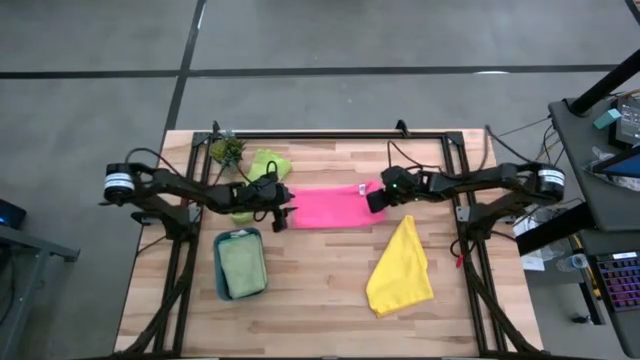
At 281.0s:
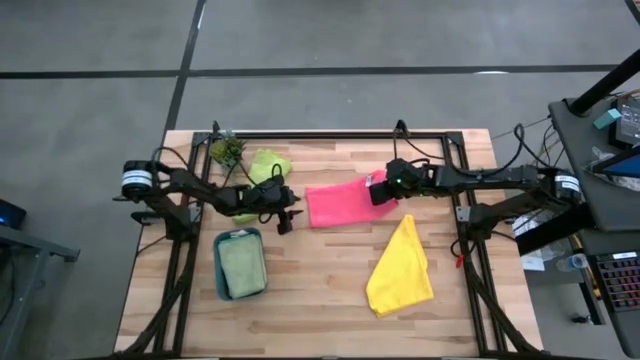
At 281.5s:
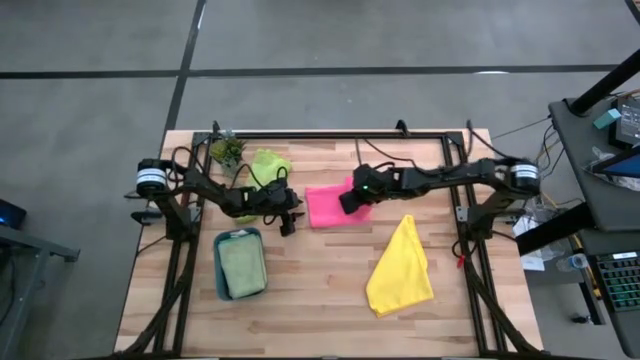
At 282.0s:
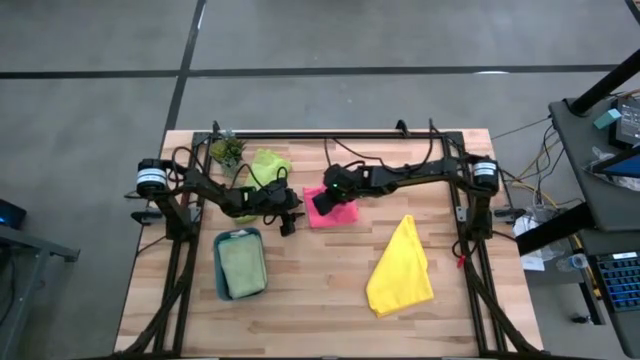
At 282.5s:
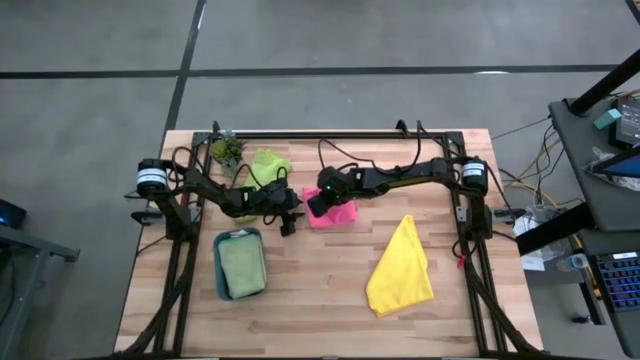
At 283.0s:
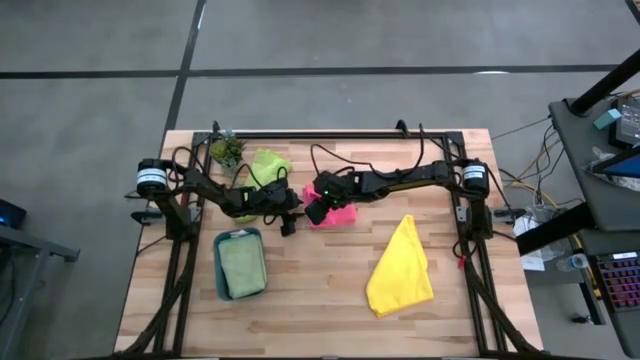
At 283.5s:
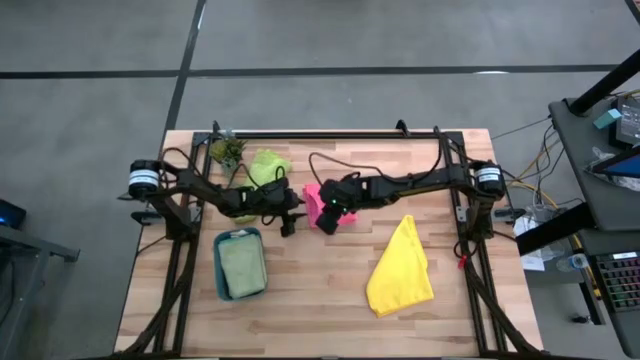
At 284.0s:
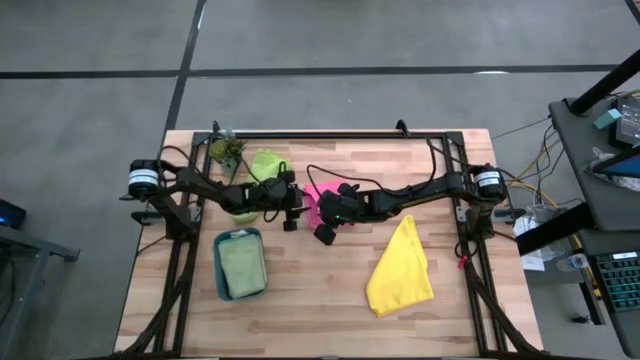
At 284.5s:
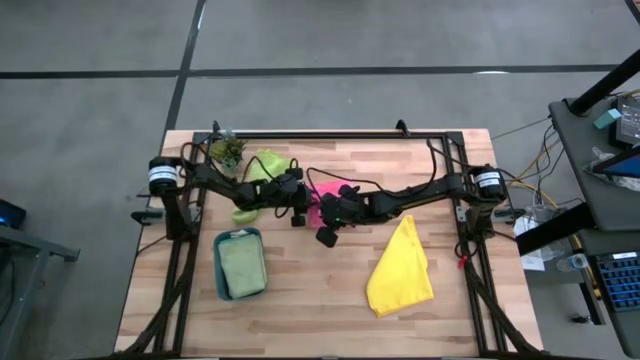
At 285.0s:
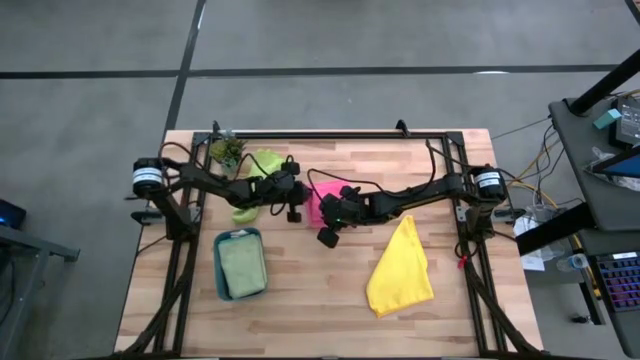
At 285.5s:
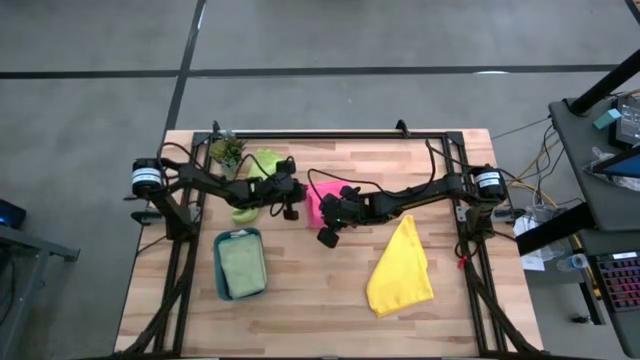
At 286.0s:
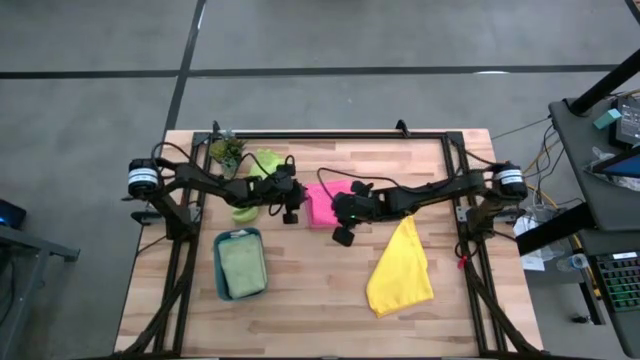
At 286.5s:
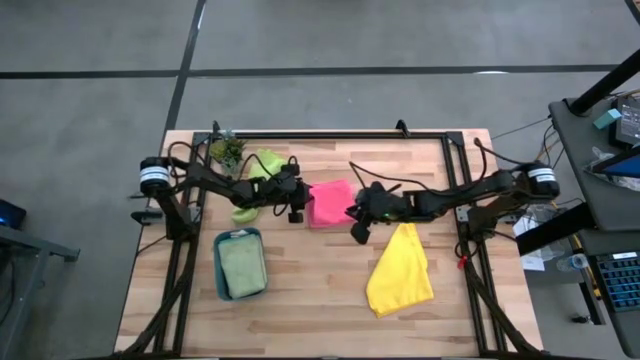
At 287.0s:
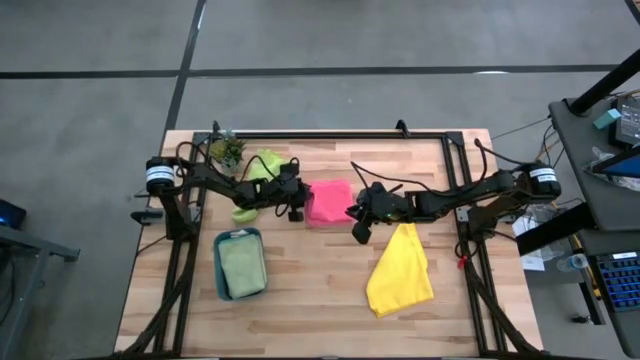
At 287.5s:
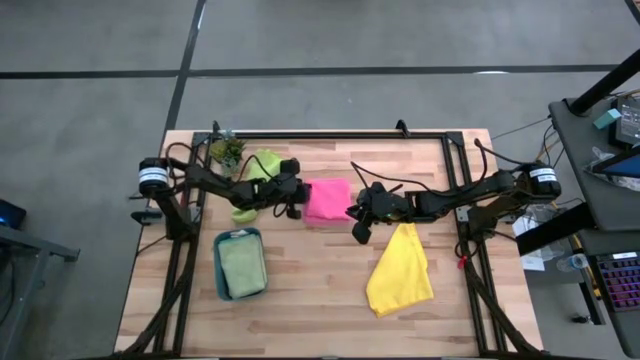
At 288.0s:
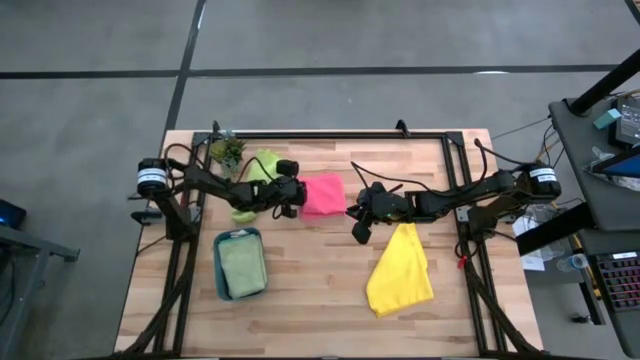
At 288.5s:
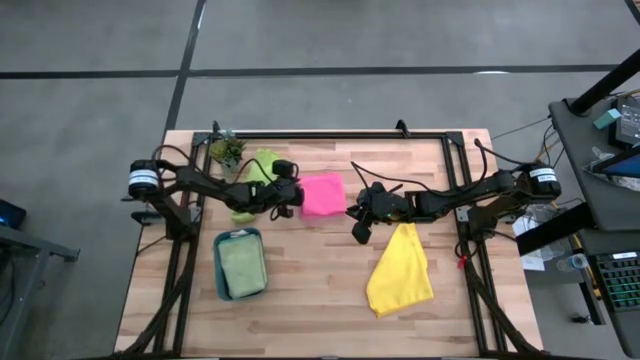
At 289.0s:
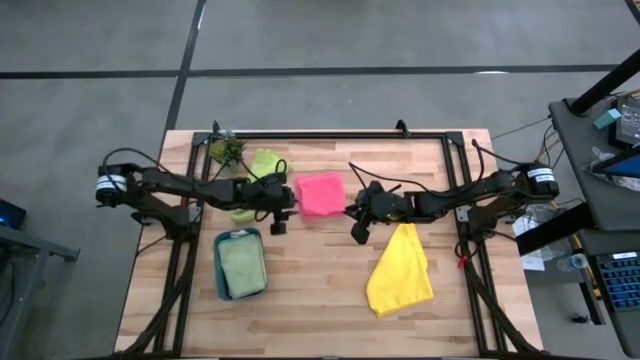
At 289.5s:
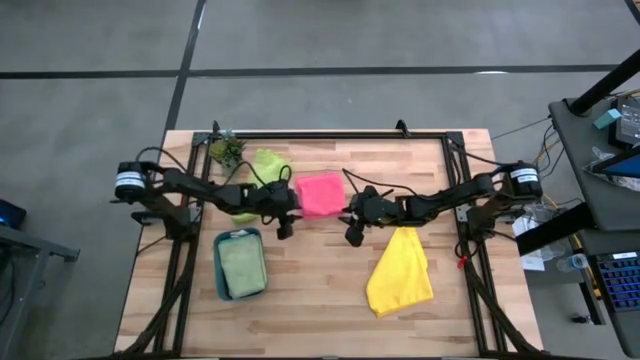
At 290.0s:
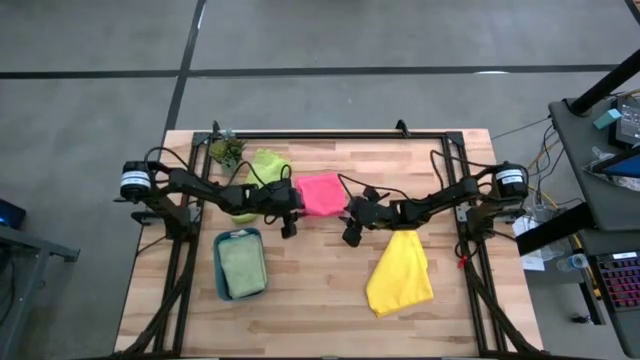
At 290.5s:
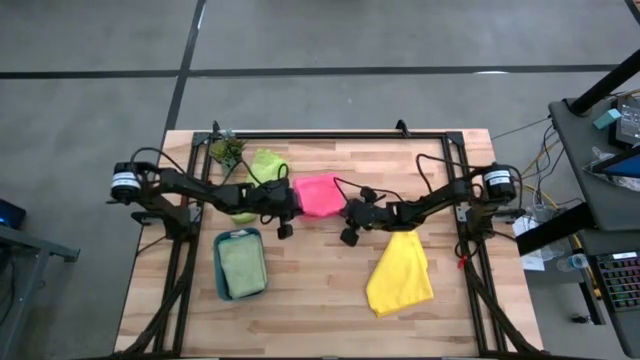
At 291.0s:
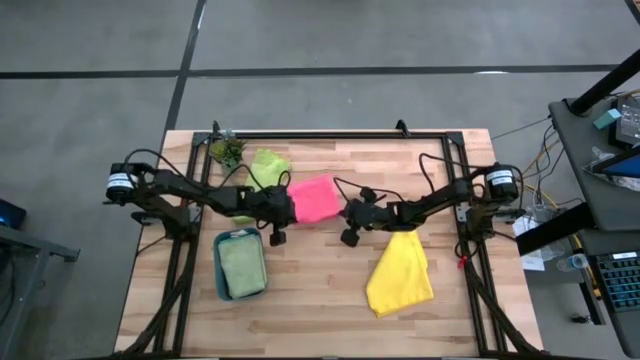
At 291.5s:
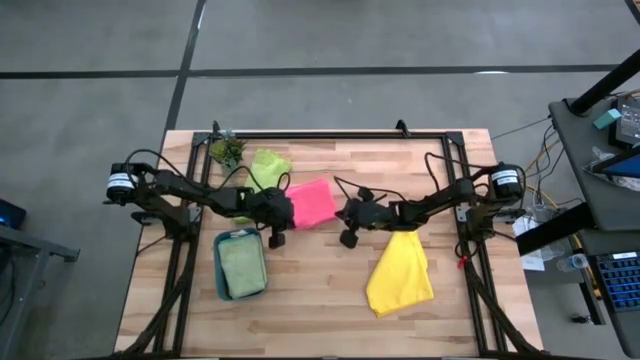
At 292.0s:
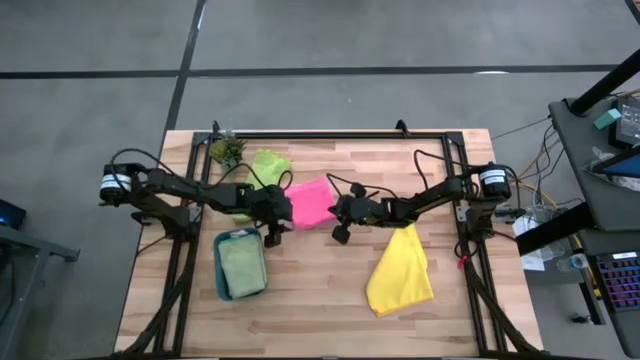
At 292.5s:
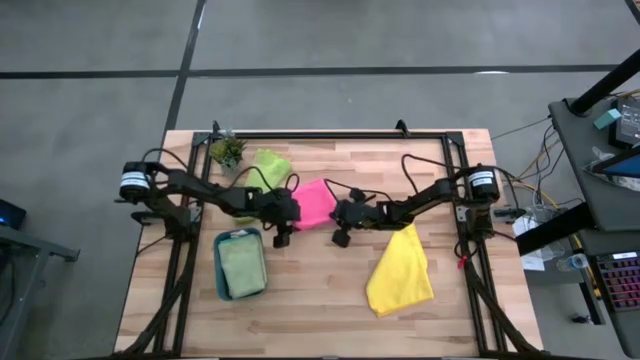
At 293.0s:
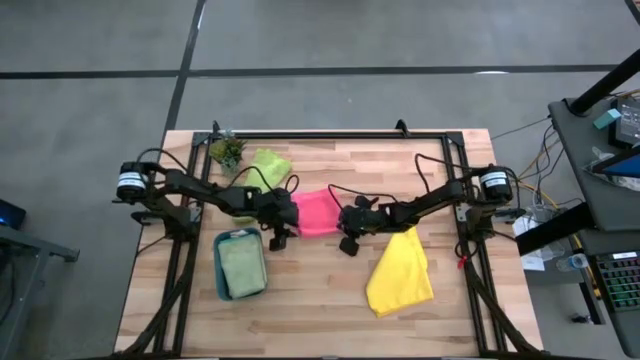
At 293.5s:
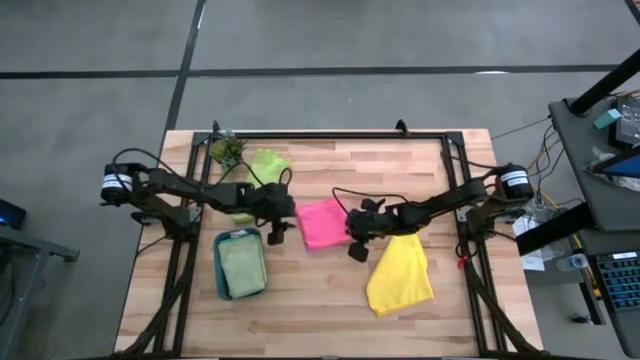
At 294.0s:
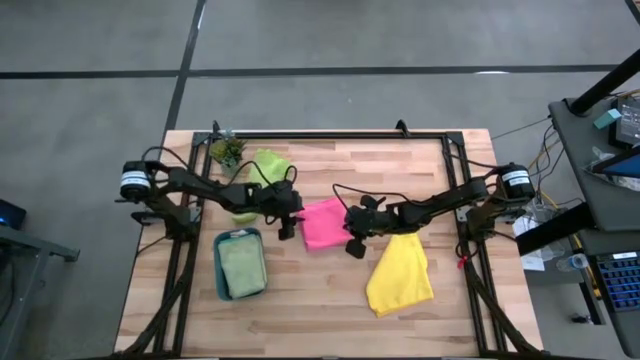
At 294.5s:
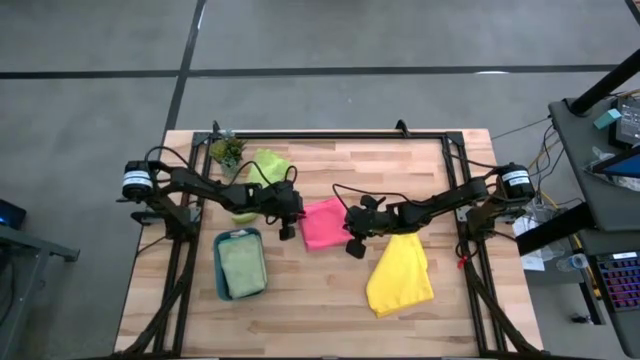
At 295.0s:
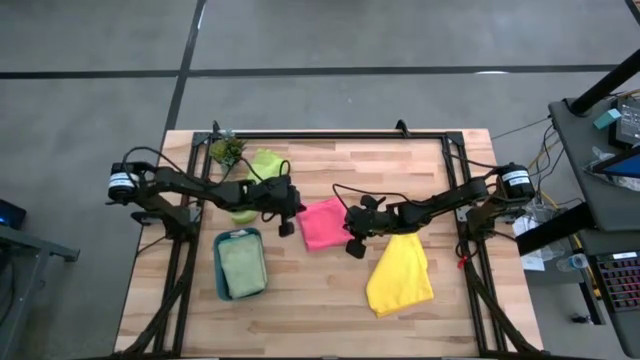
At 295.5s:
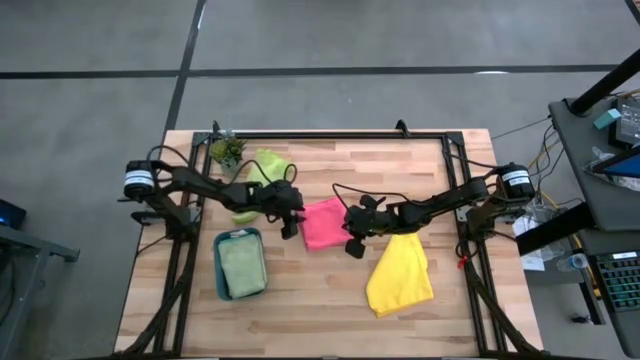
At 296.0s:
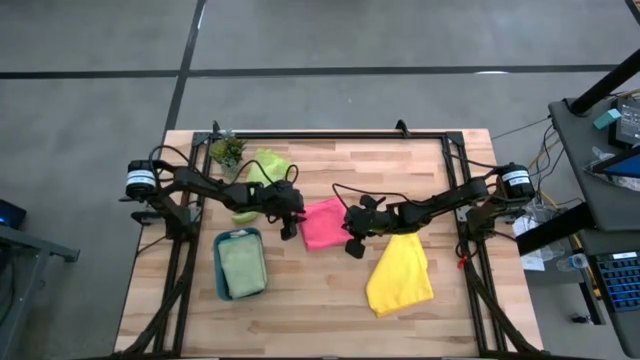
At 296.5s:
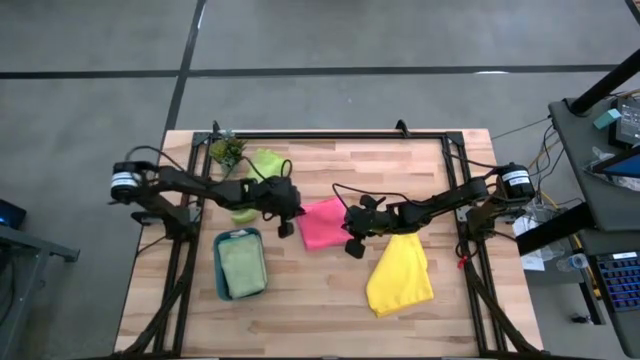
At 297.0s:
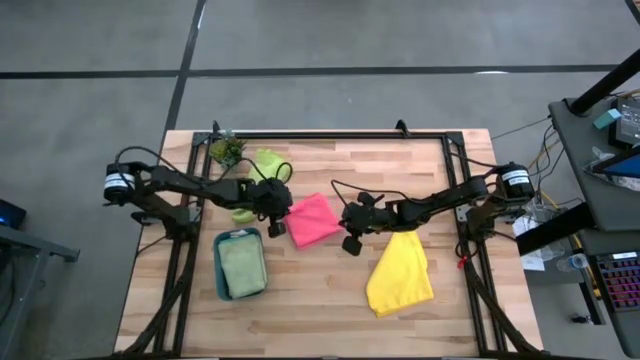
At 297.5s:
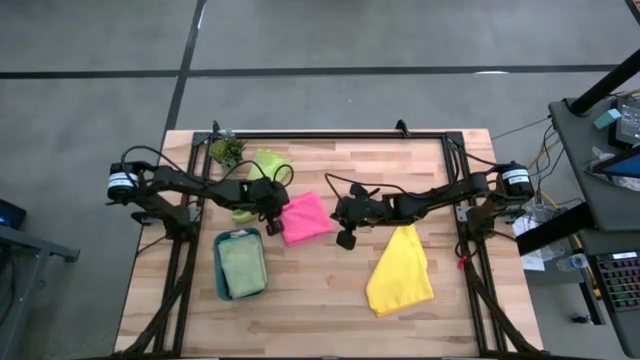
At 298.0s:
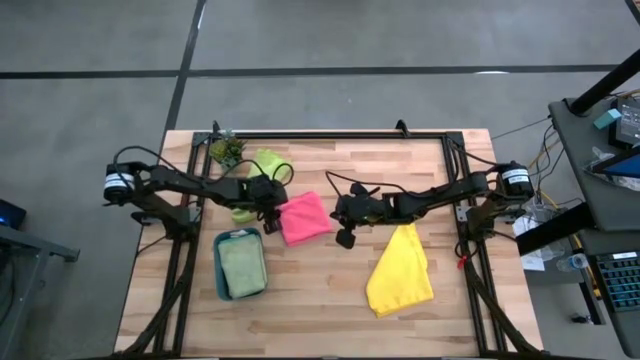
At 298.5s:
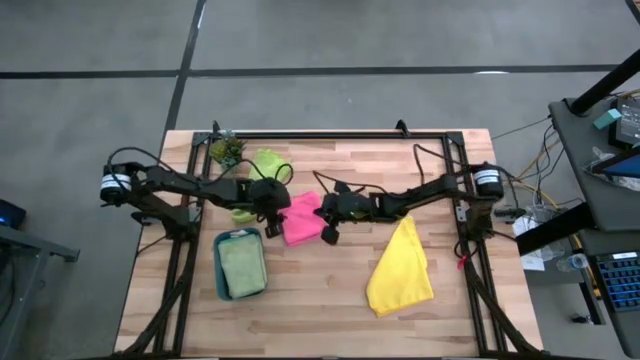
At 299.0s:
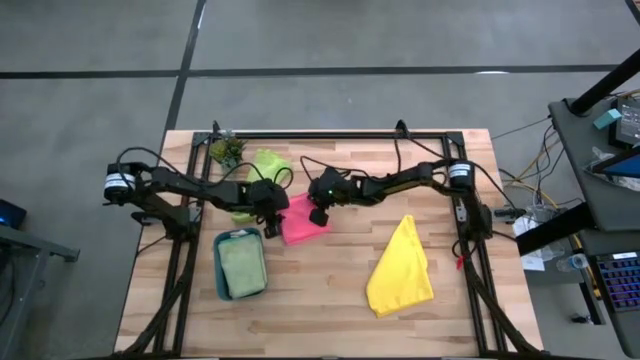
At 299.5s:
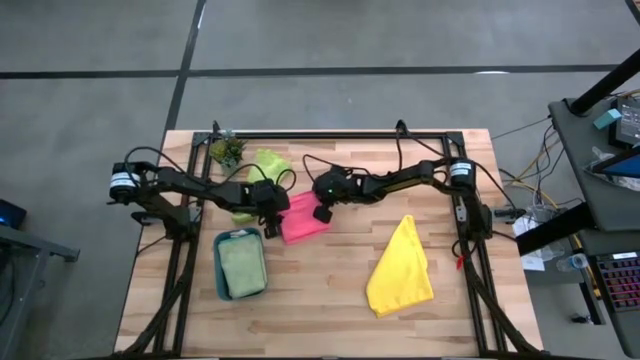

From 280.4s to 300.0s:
Task: Fold microfiber towels
Fold the pink microfiber cloth

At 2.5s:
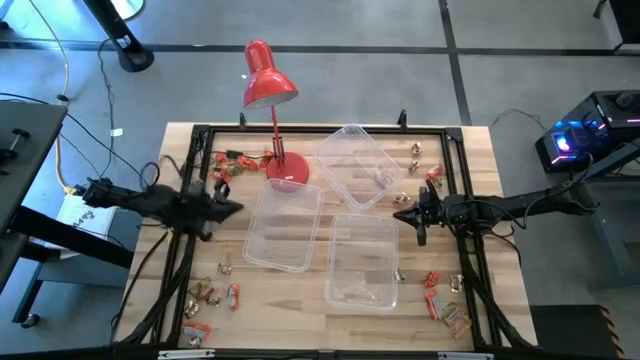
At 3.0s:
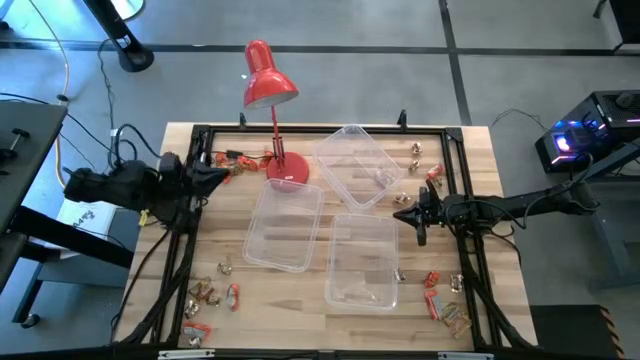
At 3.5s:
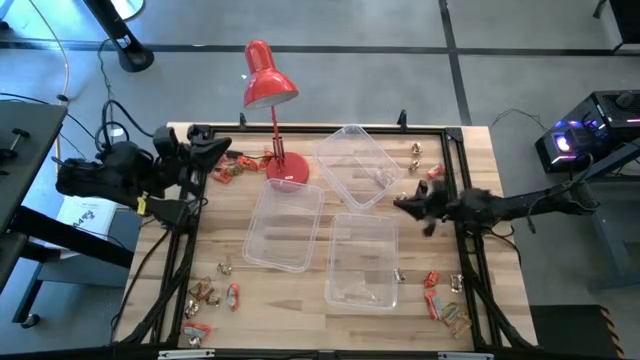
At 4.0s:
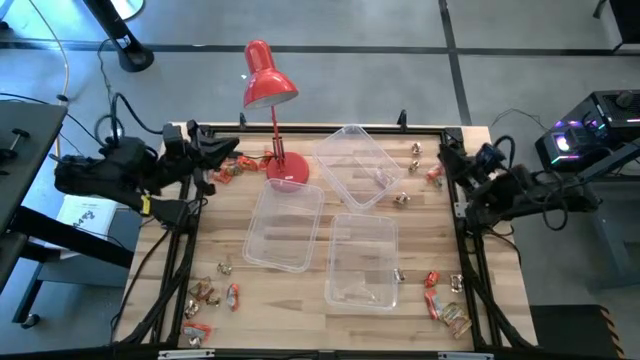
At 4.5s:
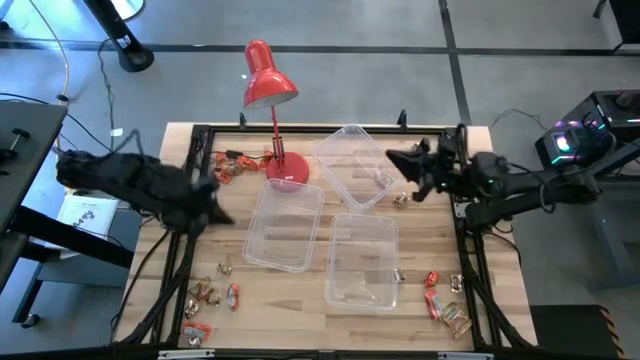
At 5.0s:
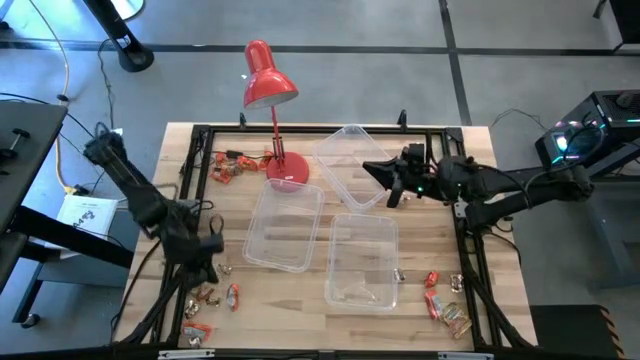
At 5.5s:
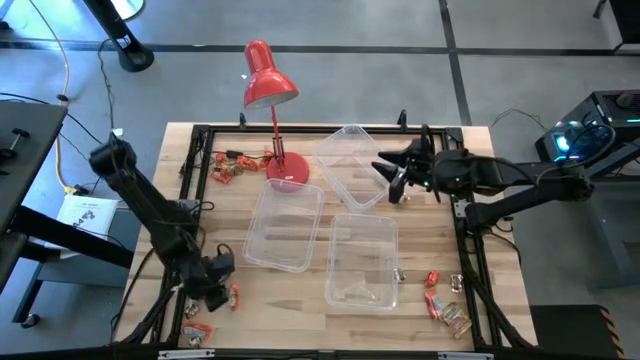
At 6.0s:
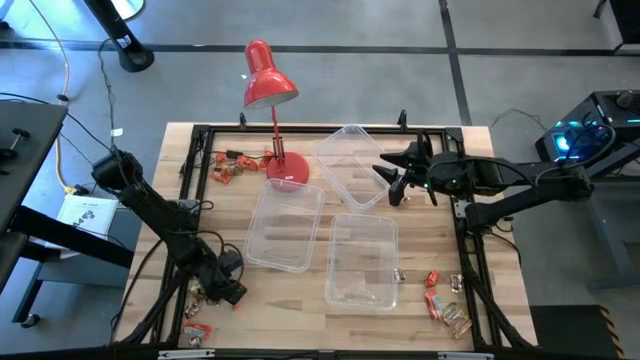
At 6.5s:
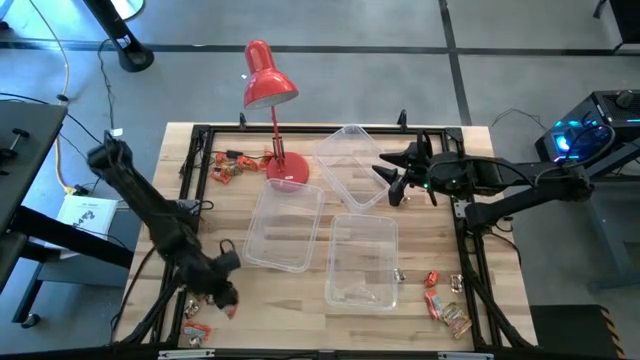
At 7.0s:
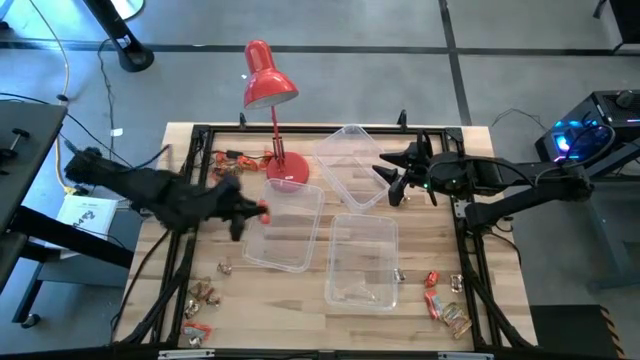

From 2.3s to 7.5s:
Task: Sort candy
Put the orange chocolate bar into the bottom transparent bin
